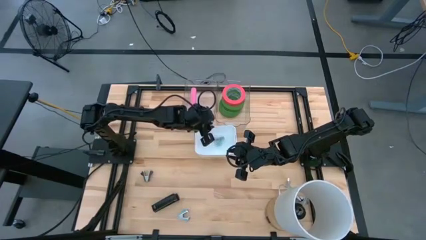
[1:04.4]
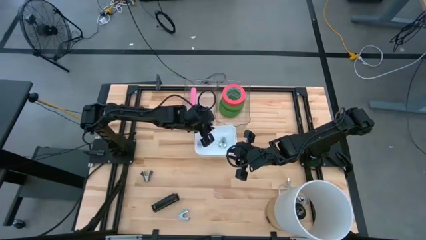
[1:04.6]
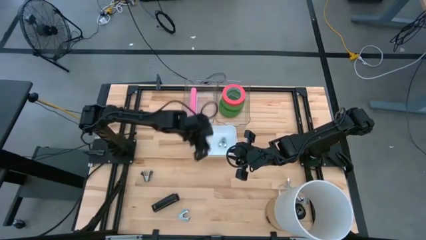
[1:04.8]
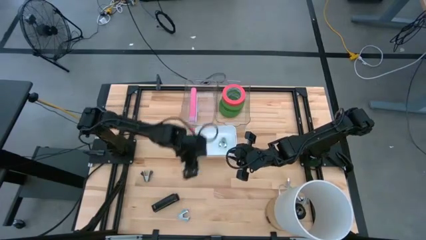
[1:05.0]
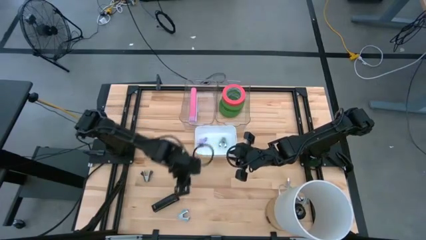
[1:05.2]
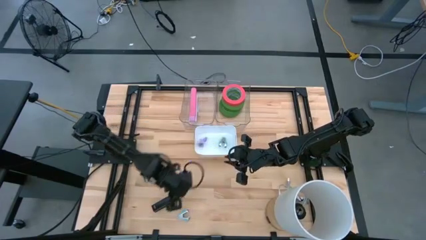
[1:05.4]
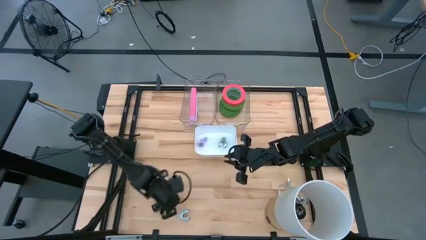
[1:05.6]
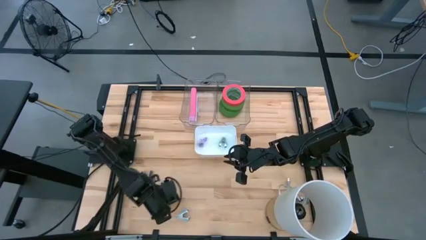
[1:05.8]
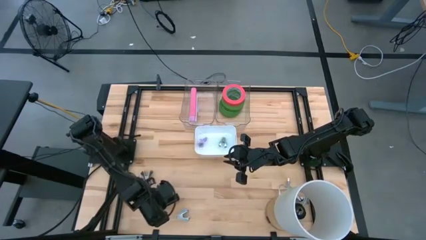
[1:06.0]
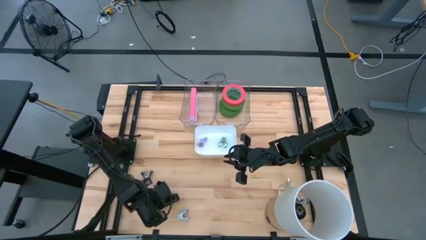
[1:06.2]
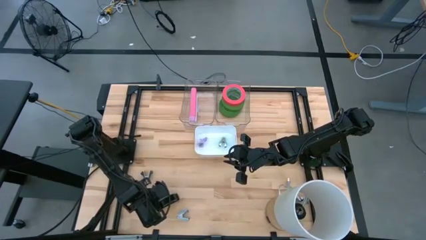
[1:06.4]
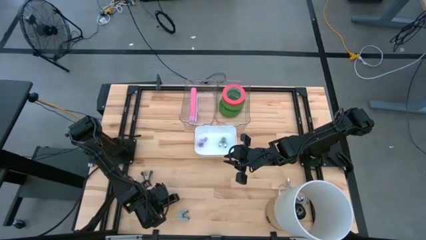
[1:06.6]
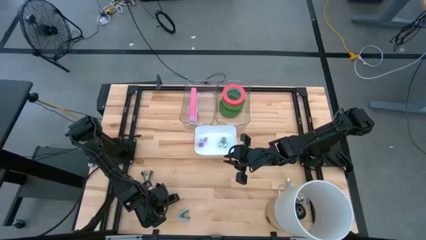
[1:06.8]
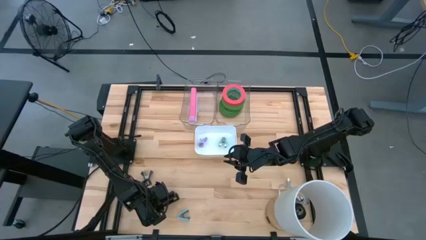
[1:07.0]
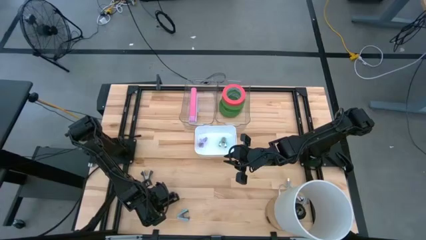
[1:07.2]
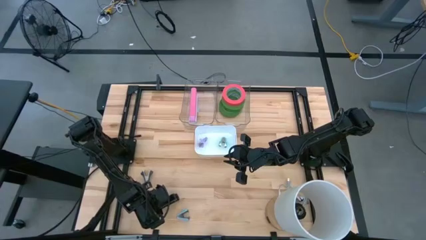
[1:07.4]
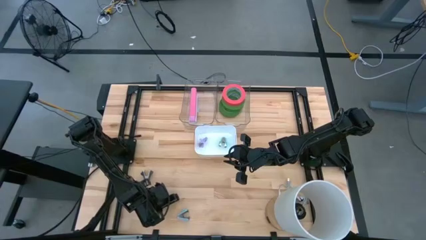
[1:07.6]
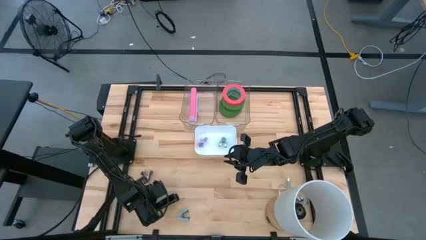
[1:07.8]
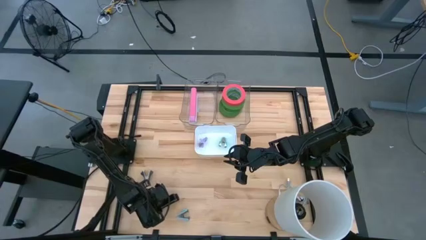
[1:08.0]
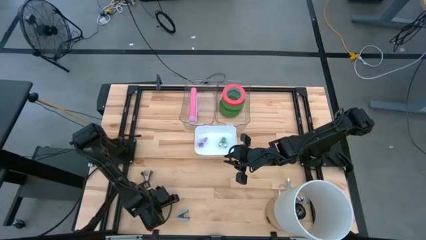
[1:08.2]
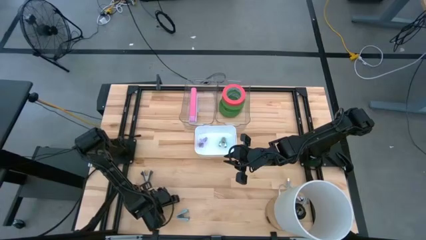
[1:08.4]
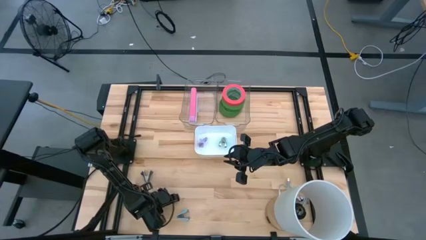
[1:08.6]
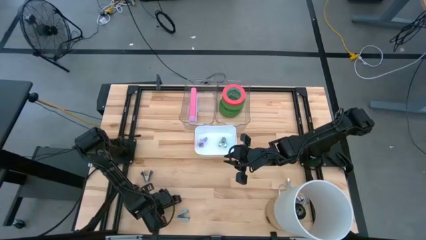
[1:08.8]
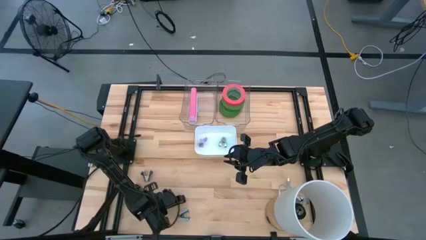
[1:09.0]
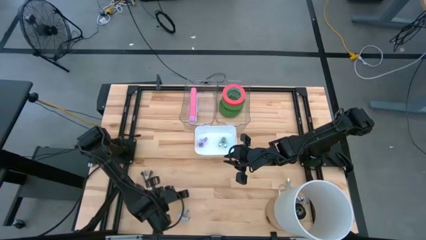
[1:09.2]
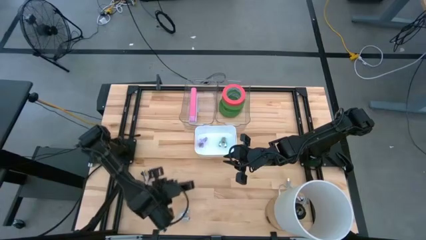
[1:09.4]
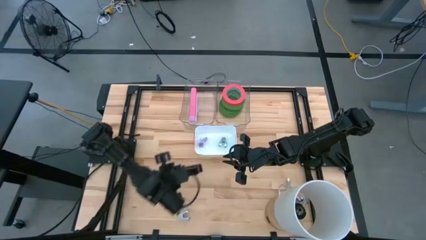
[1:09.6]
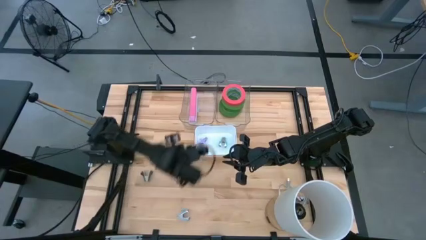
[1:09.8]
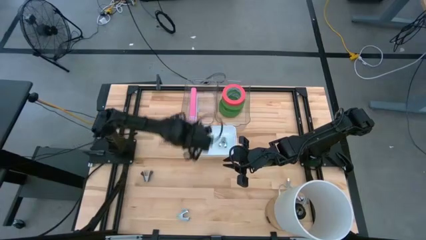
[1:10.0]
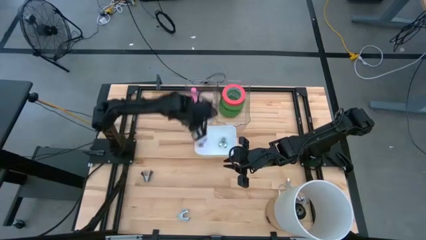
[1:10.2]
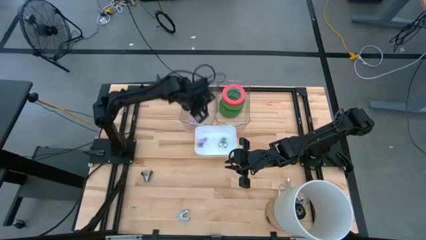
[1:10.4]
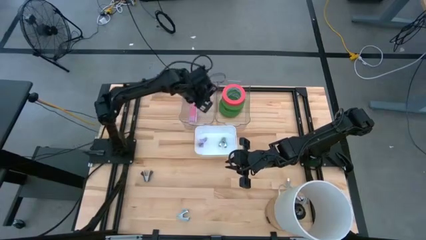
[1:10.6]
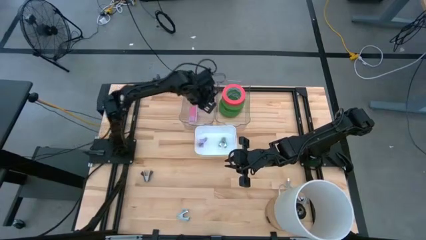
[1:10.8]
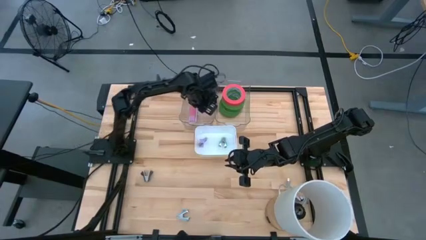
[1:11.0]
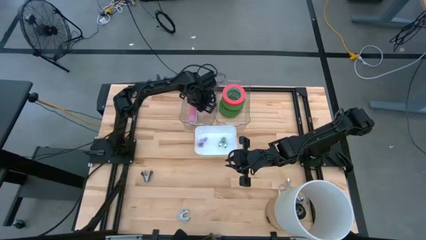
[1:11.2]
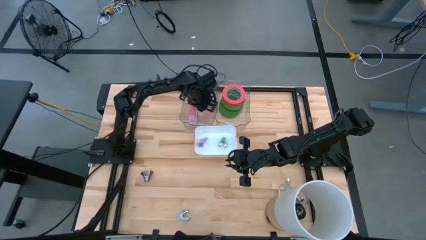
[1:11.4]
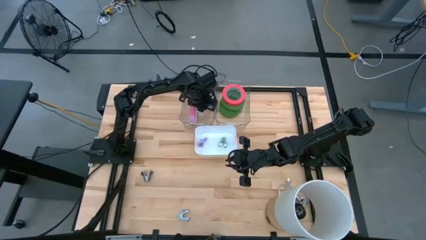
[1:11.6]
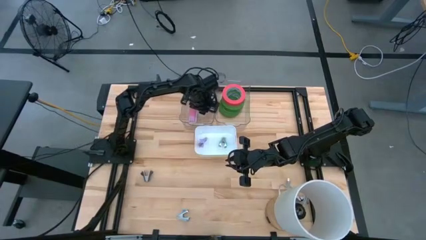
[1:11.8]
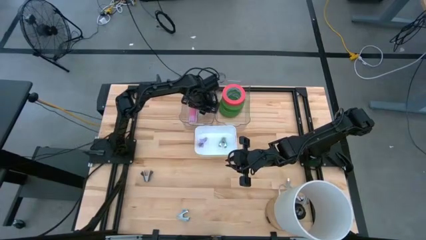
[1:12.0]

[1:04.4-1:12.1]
Task: Pick and place Stapler, Stapler remover, tape
Put the black stapler into the left transparent bin

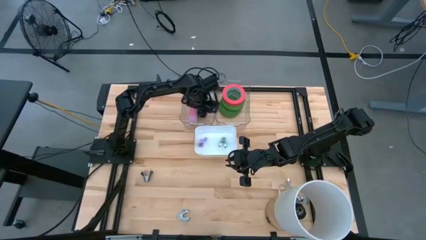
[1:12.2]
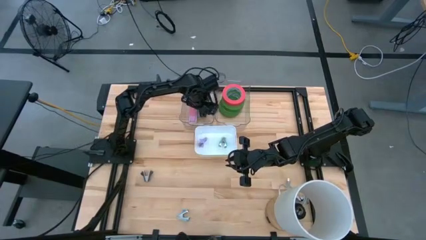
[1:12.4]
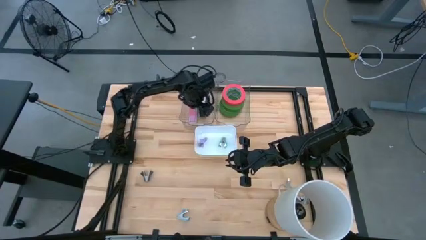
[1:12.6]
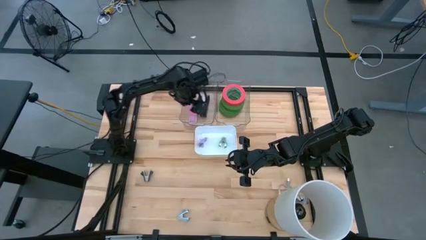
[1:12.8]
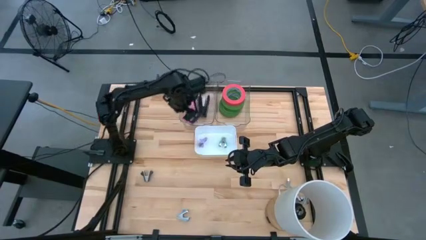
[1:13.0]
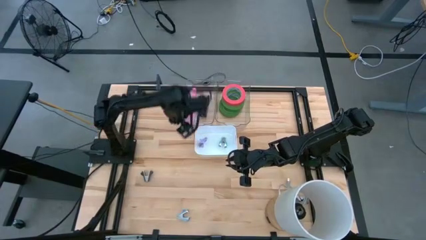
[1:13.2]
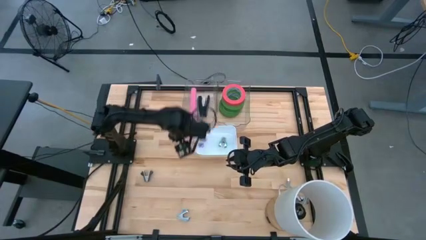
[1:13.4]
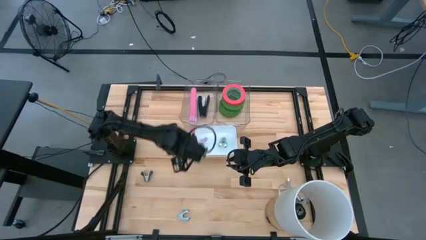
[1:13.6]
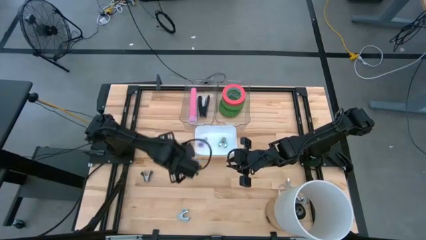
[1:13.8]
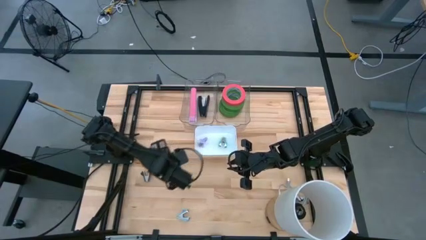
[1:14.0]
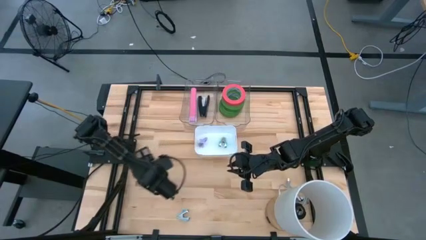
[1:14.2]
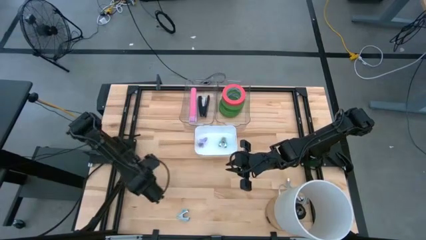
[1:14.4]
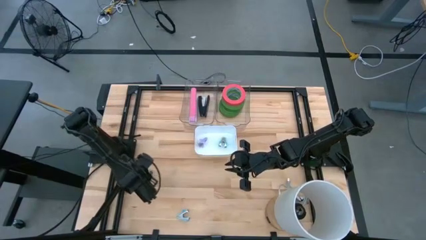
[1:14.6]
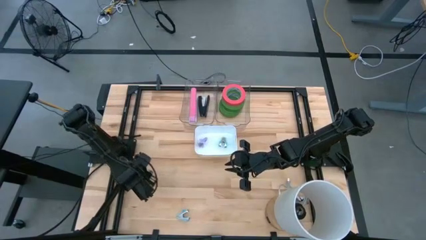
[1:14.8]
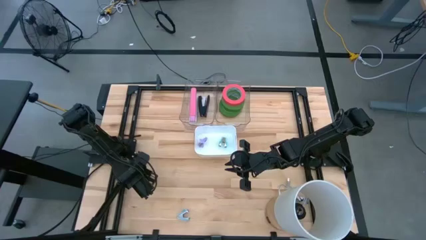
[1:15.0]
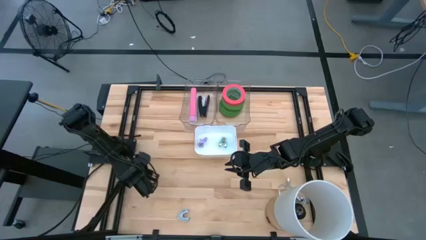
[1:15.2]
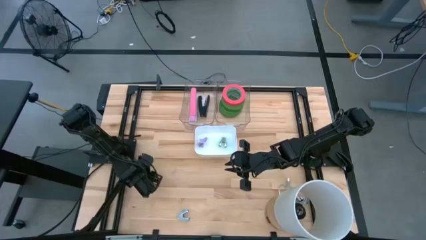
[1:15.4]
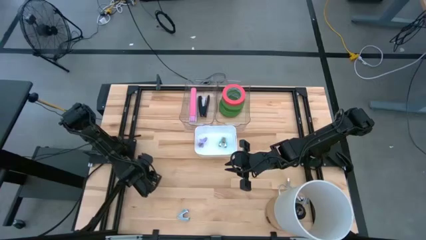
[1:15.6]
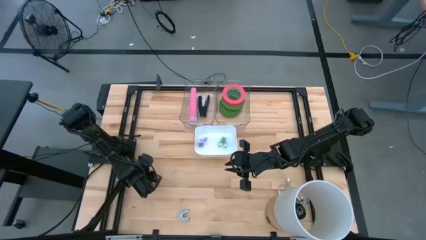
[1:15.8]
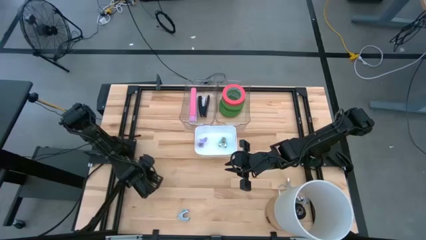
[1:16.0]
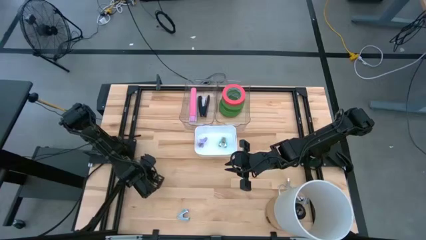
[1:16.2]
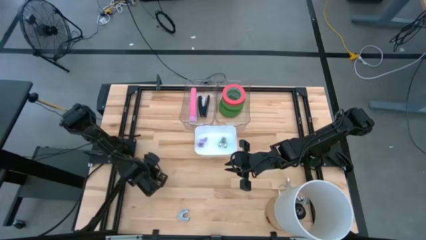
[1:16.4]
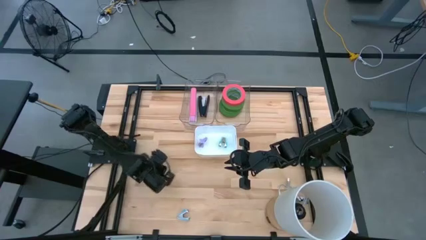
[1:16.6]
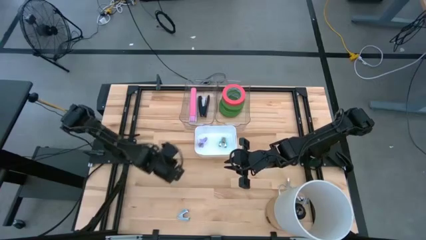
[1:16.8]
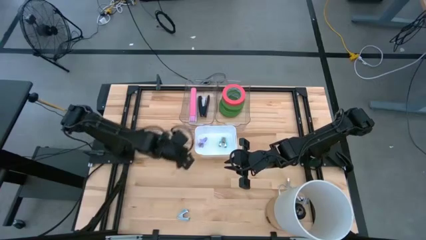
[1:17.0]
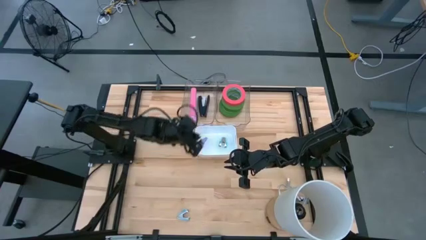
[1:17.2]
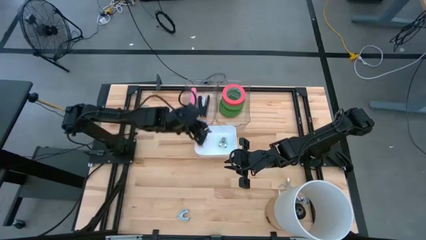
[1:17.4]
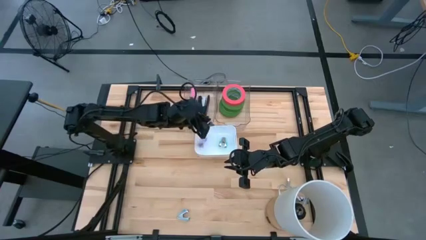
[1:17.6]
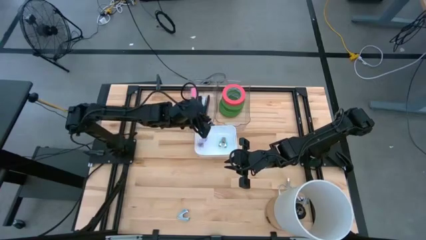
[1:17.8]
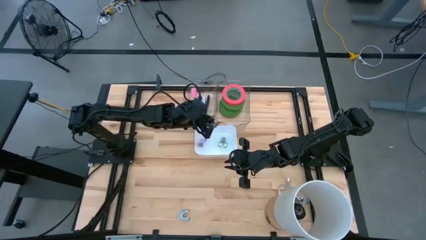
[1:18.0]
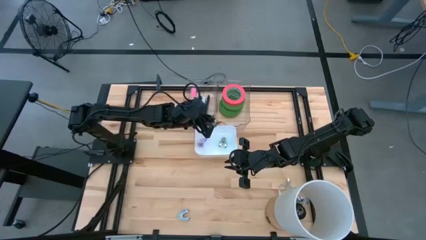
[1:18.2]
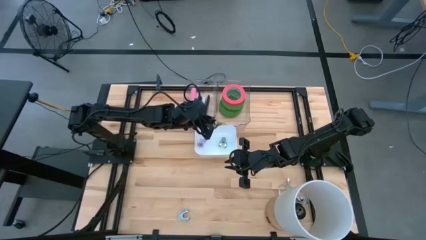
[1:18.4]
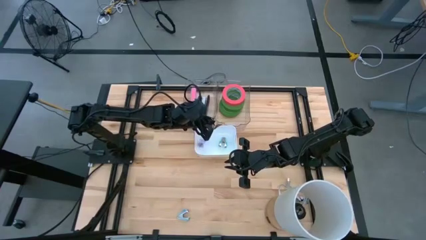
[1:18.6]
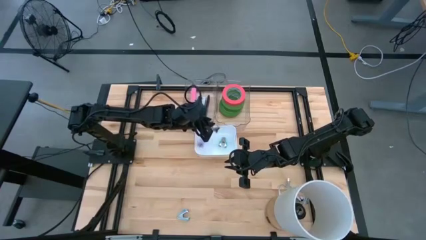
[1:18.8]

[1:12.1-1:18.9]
Put the black staple remover into the white bin

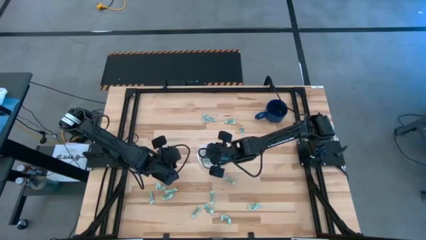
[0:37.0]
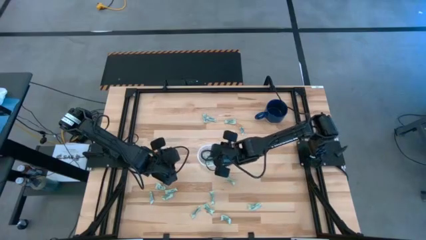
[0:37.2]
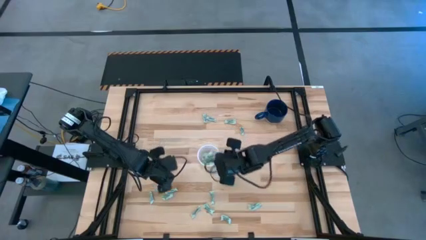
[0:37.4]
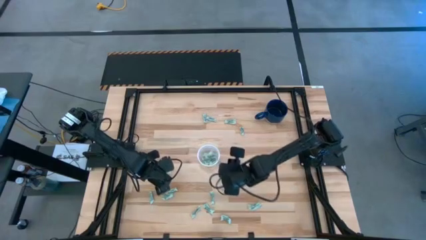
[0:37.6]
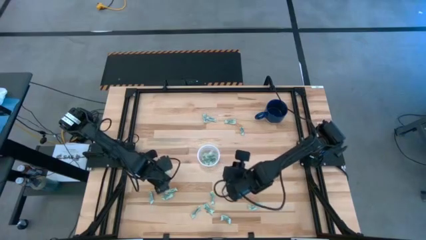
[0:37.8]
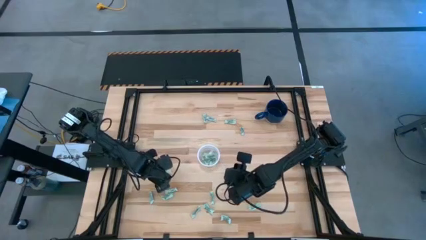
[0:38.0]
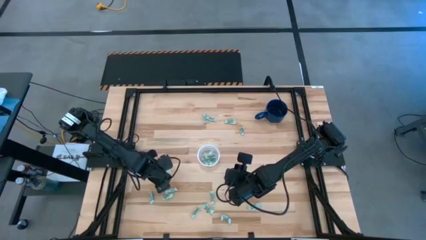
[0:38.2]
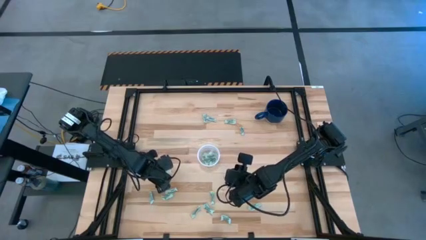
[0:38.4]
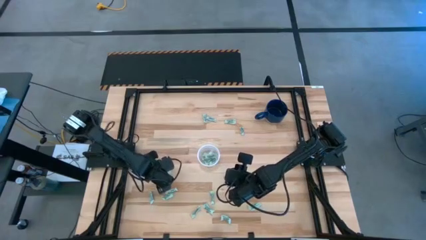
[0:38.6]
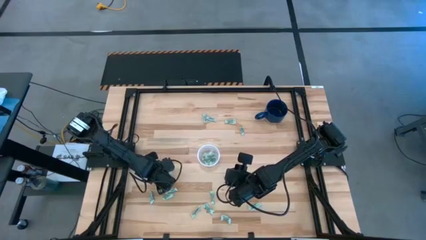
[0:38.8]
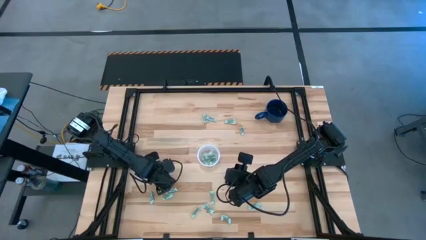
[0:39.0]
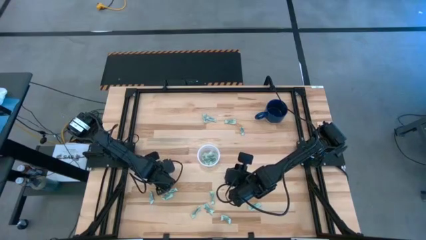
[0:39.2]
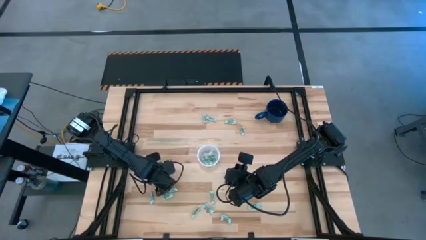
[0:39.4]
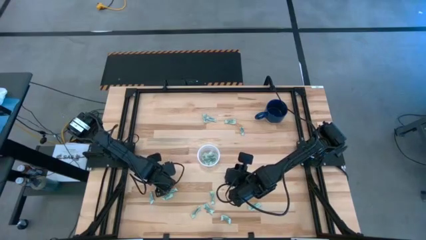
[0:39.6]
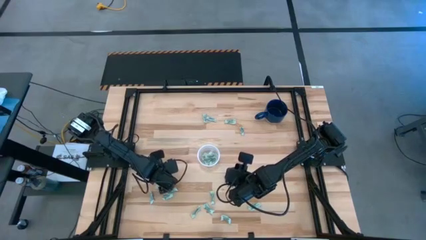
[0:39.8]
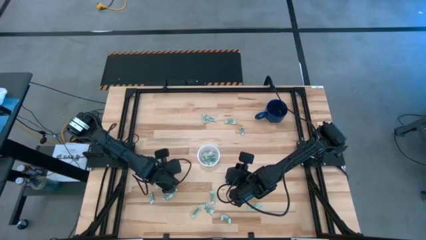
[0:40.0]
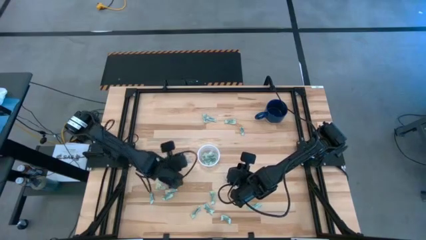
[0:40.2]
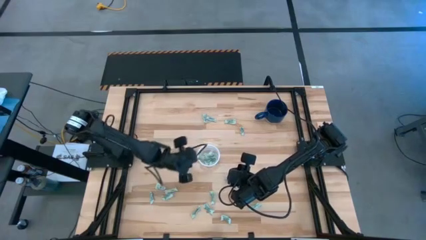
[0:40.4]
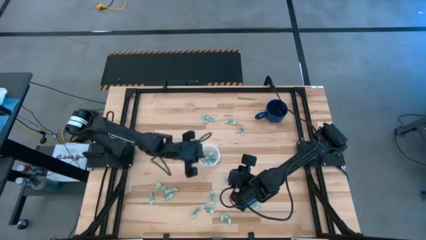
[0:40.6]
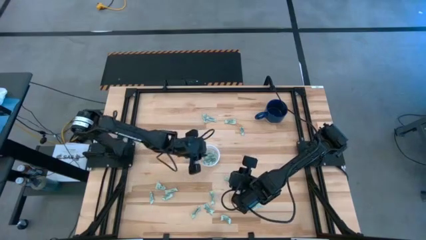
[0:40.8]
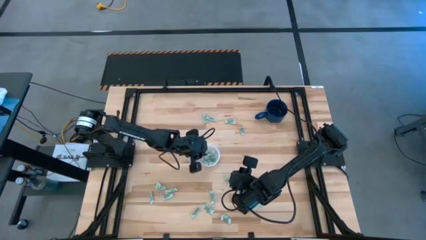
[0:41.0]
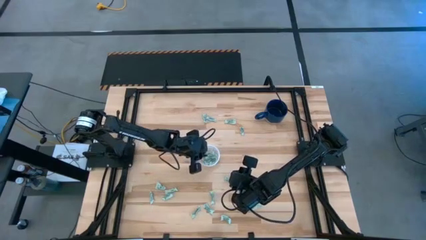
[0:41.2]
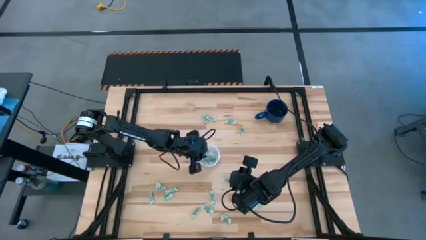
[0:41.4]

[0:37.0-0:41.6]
Task: Pick and place items into bin
Put the stevia packet into the transparent bin
